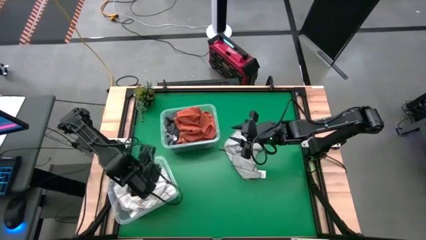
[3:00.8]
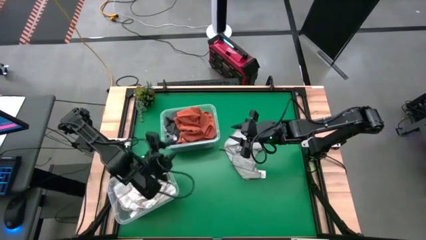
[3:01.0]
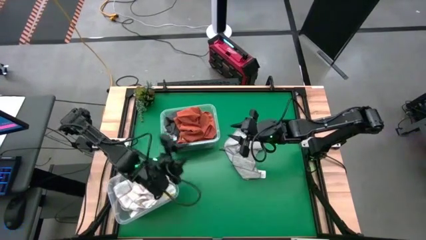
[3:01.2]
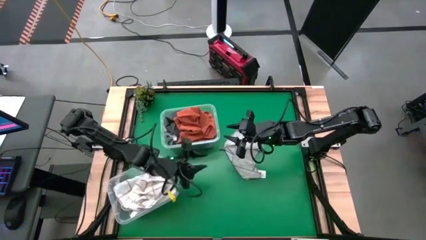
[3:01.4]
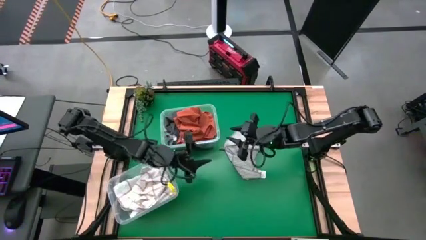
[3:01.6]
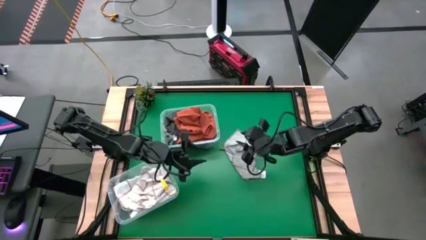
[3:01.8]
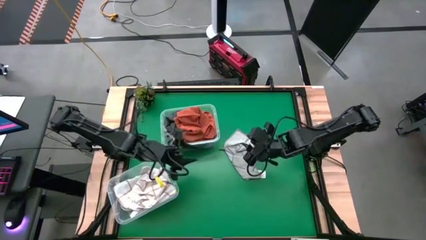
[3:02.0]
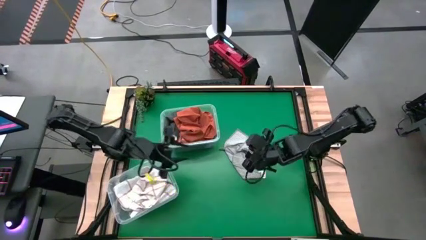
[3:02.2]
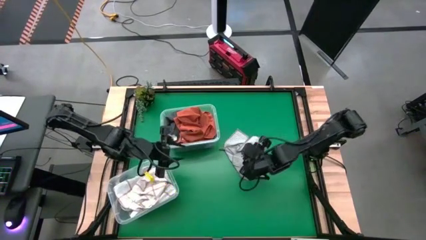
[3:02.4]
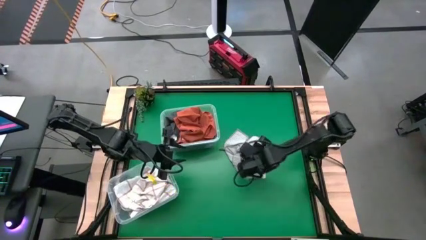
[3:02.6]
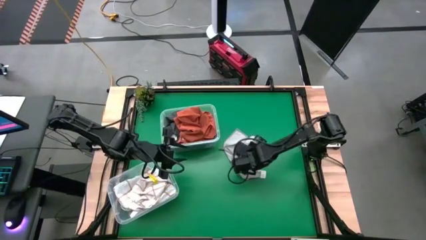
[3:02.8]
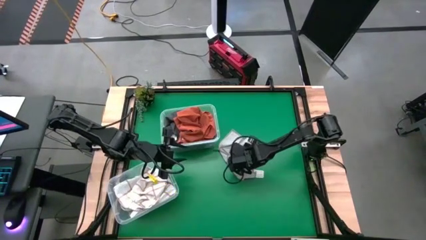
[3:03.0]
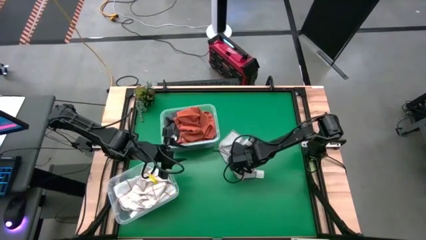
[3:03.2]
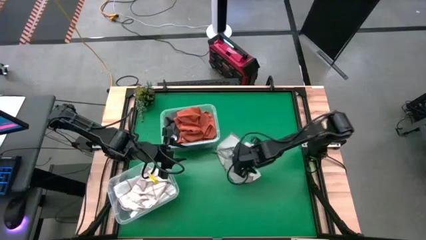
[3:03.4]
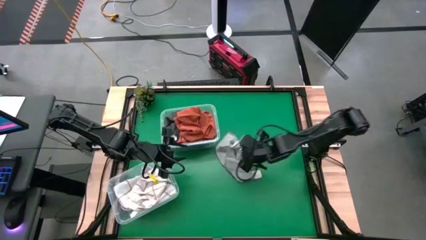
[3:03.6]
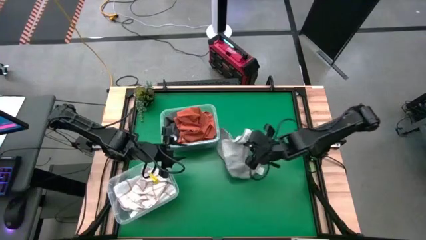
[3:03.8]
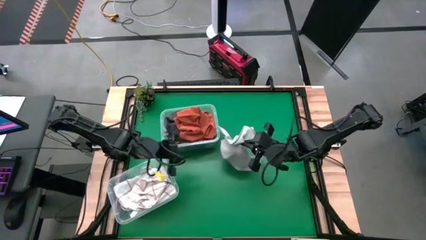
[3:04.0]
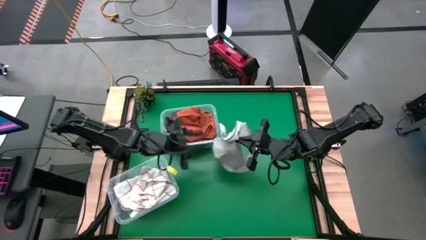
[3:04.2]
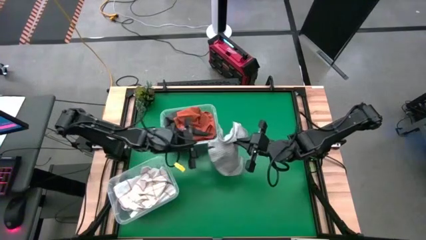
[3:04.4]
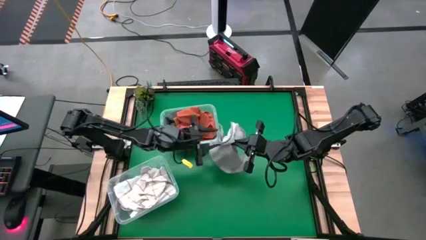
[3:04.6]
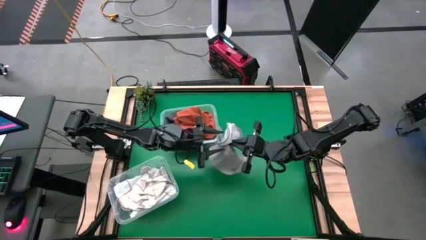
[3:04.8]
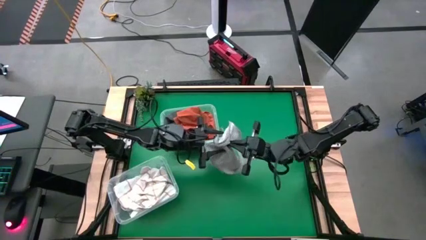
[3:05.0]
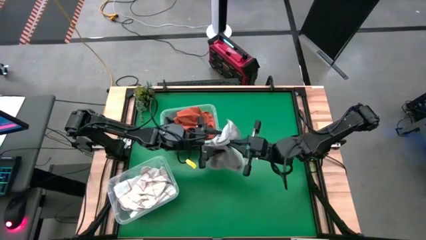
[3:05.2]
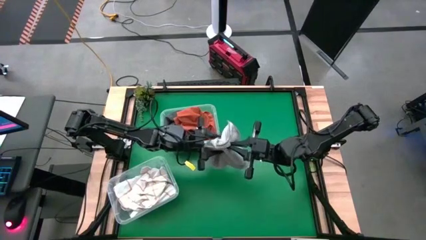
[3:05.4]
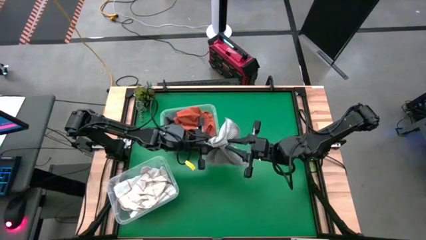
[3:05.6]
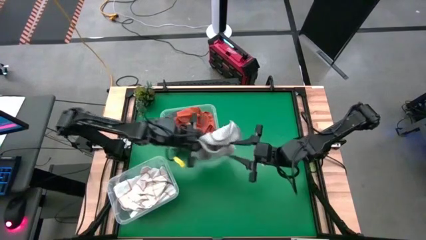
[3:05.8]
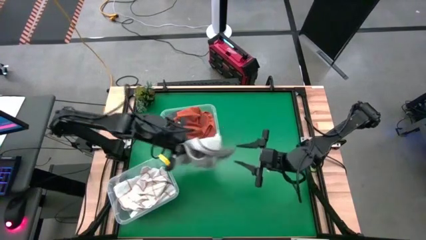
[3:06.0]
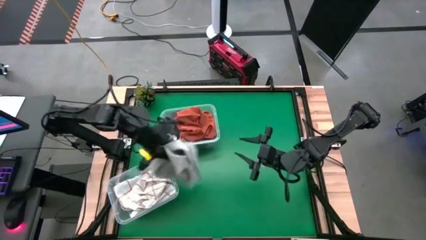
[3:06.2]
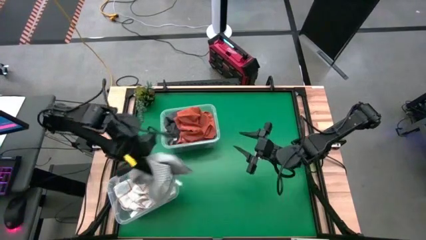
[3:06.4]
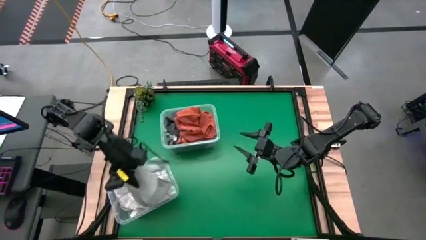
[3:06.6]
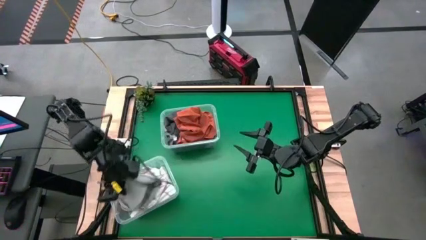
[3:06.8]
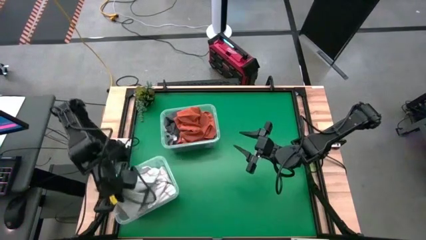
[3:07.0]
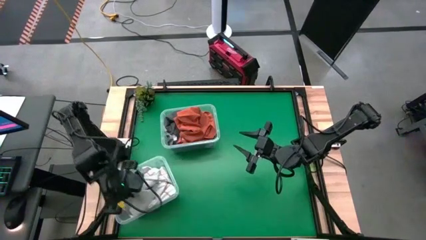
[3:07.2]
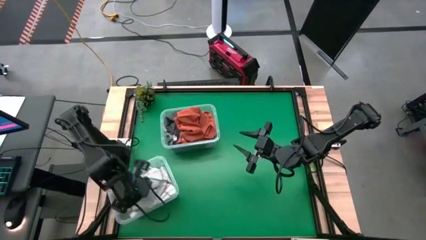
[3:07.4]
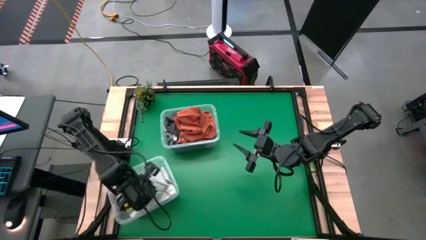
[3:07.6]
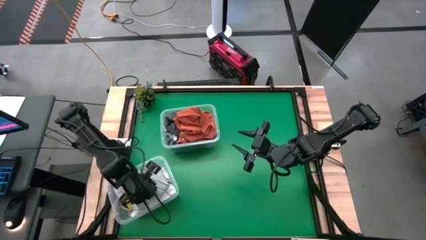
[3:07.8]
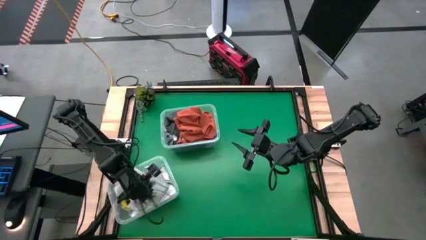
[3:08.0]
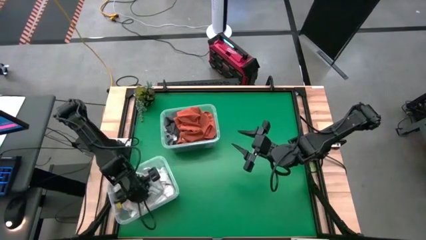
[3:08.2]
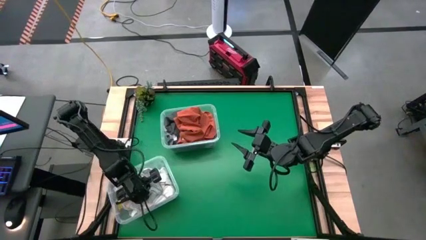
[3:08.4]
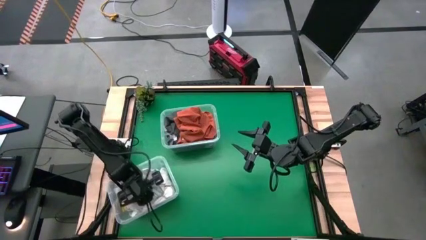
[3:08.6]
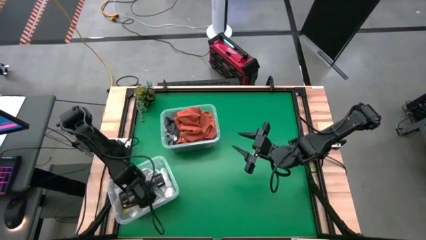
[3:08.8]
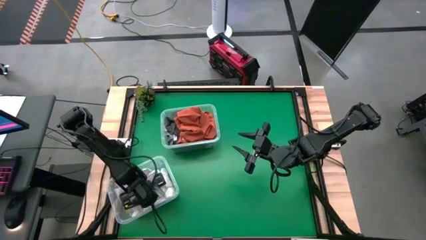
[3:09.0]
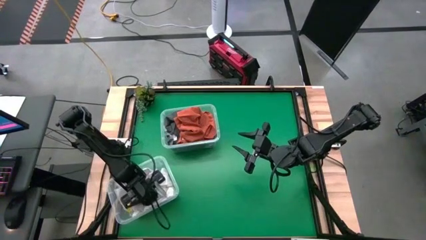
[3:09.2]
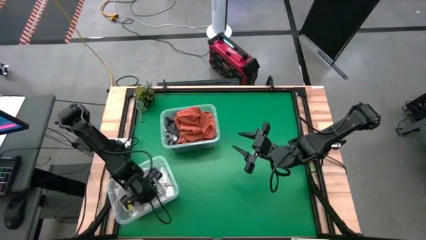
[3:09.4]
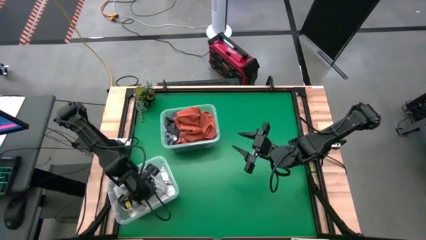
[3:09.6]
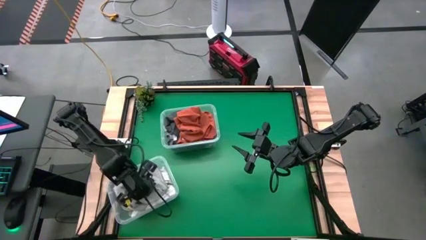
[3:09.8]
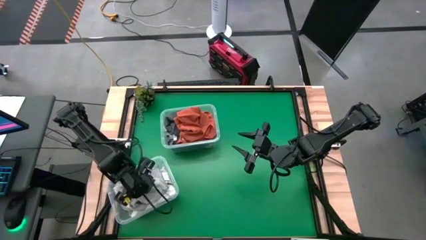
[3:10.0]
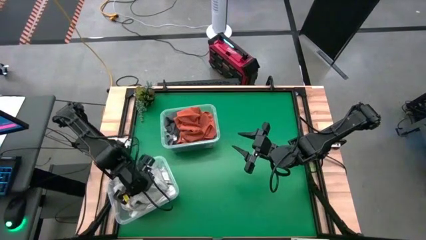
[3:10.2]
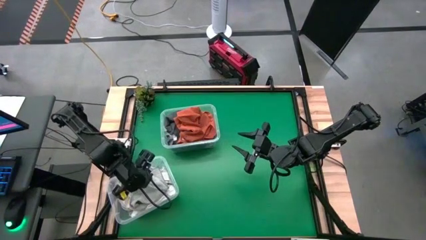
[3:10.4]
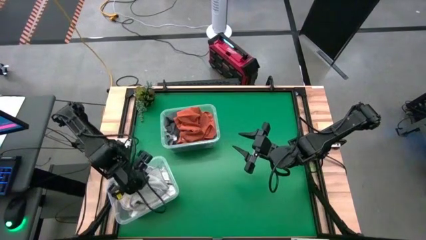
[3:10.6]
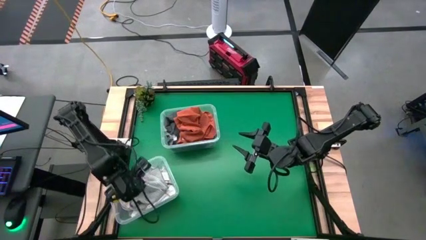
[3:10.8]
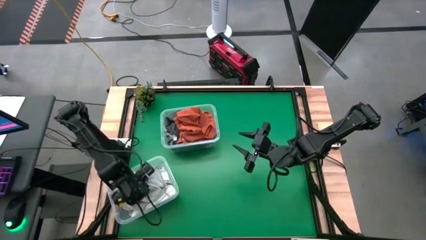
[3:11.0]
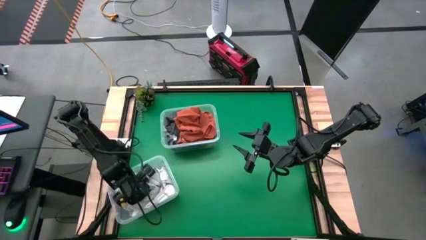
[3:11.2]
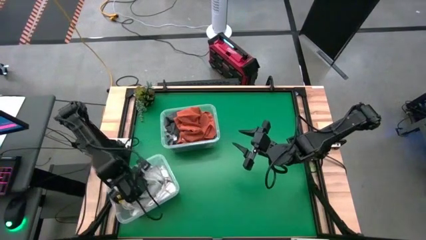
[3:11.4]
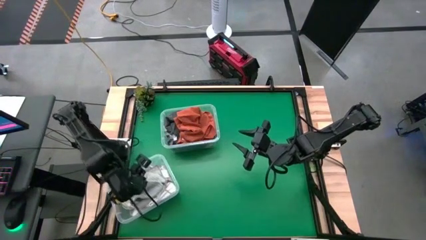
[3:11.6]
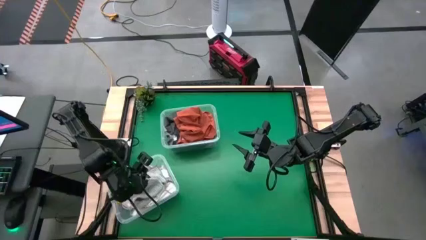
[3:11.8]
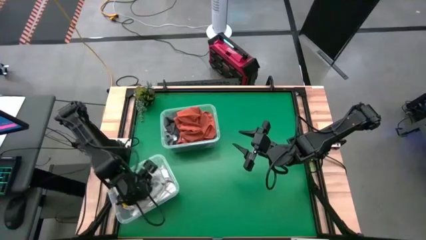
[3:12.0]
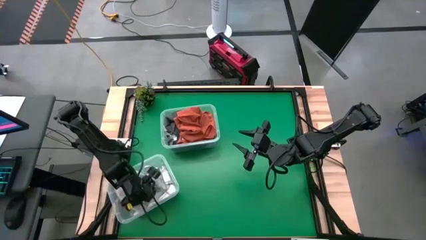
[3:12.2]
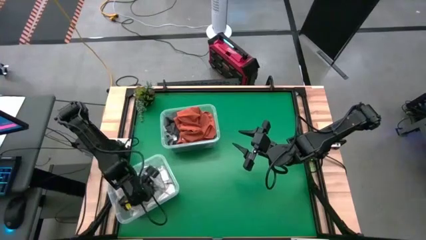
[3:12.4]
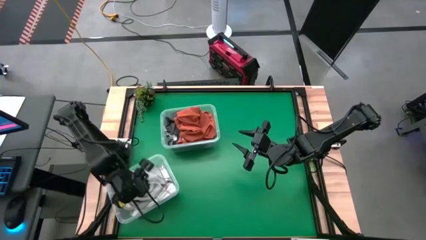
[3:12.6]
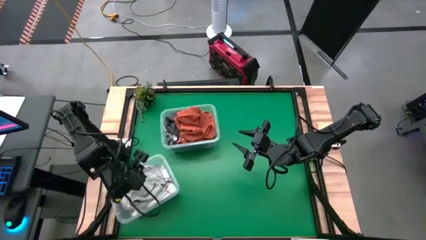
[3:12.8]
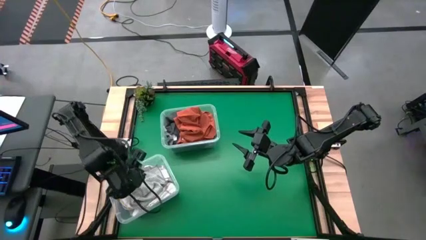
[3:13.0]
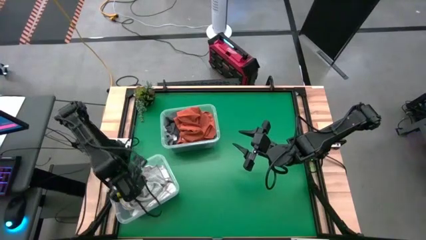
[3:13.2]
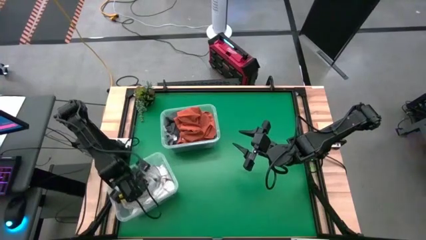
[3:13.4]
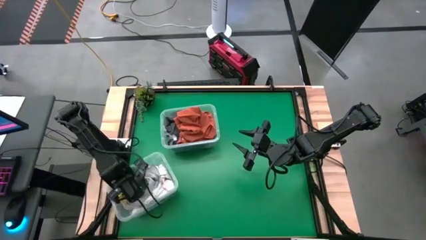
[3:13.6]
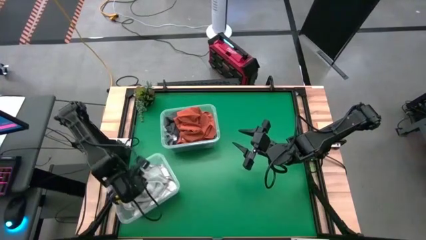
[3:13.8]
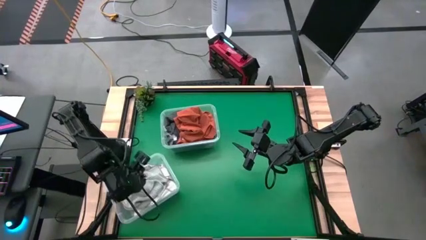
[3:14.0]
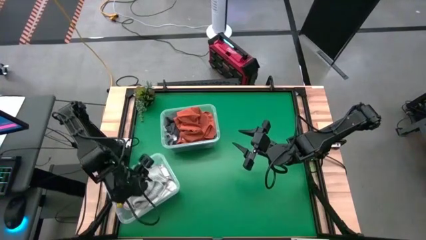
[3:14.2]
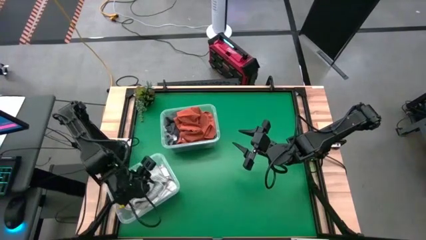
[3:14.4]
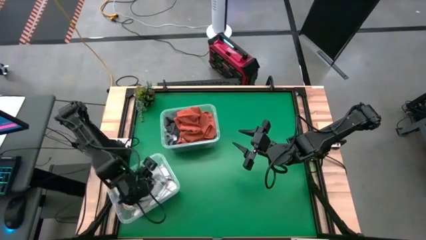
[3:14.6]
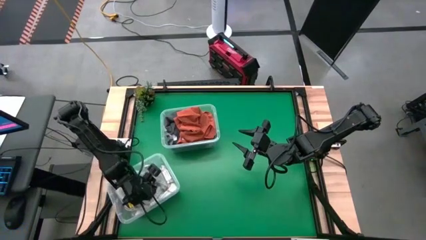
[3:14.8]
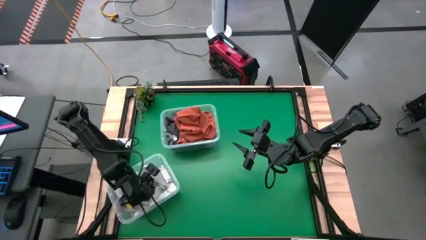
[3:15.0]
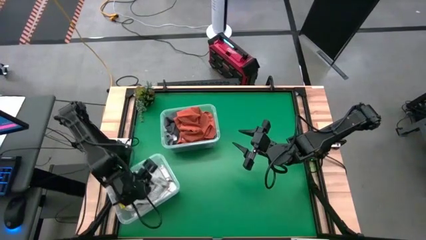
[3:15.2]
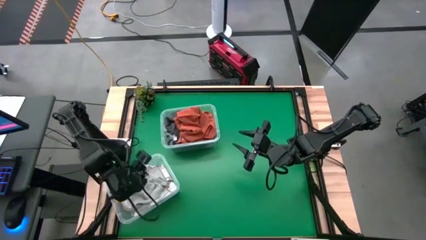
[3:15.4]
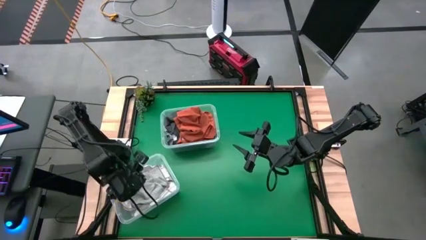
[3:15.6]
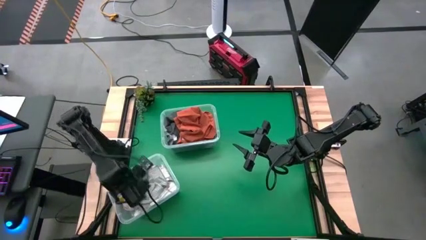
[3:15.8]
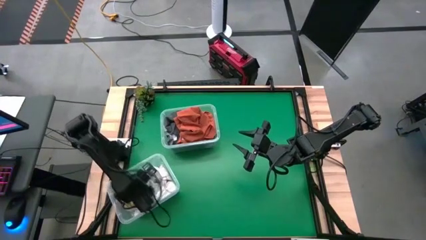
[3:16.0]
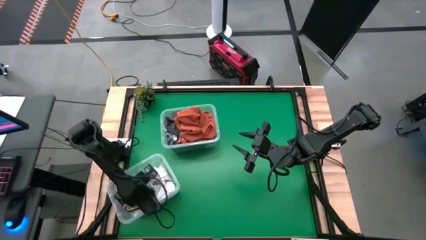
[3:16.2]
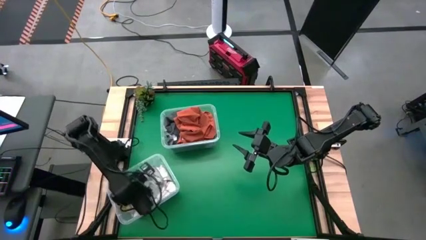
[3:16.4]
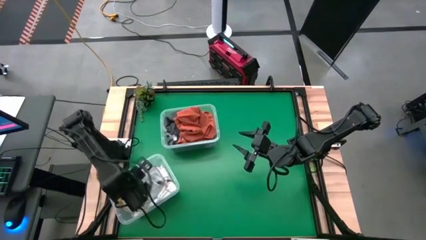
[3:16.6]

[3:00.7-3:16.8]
Task: Sort towels by color in basket
Put the light gray towel into the bottom transparent bin

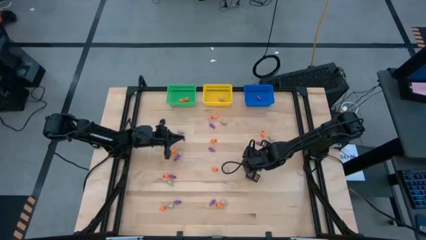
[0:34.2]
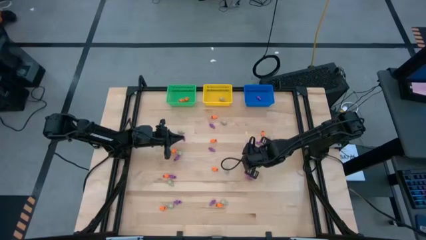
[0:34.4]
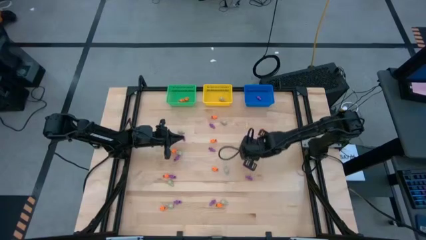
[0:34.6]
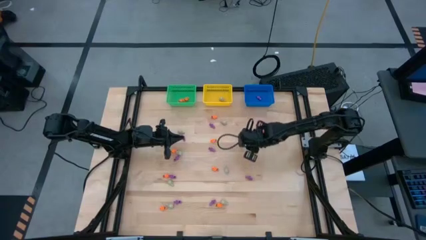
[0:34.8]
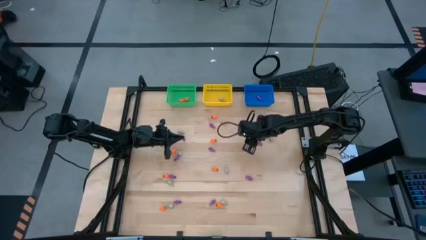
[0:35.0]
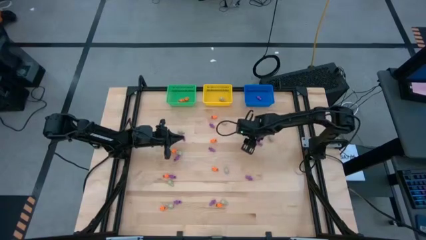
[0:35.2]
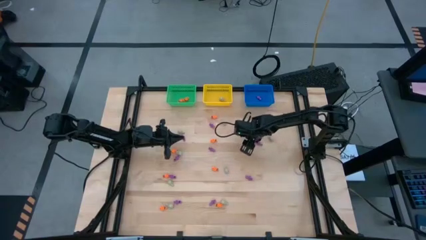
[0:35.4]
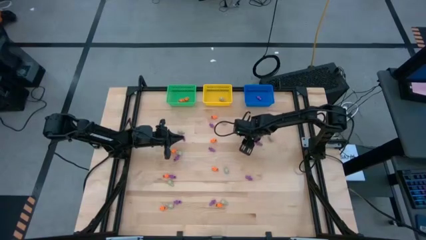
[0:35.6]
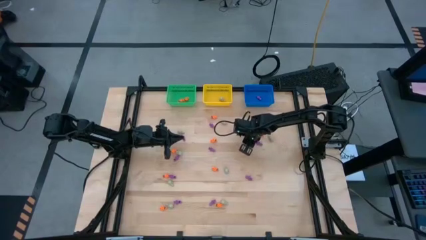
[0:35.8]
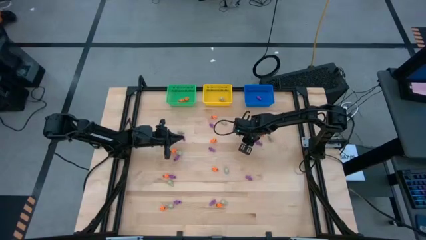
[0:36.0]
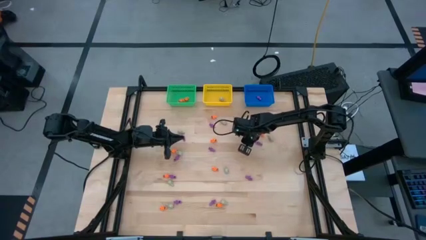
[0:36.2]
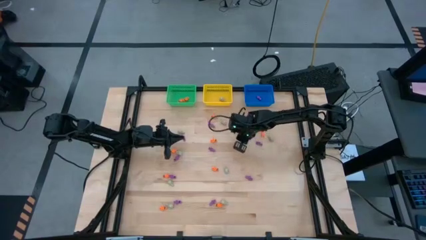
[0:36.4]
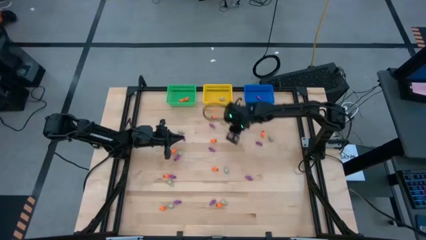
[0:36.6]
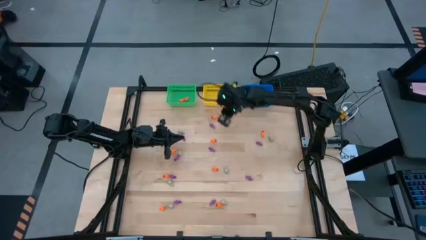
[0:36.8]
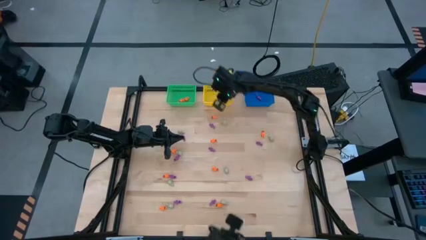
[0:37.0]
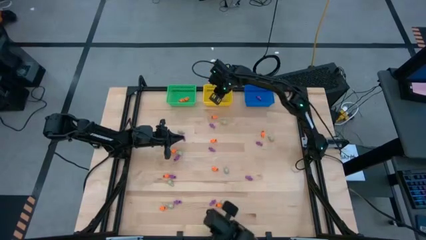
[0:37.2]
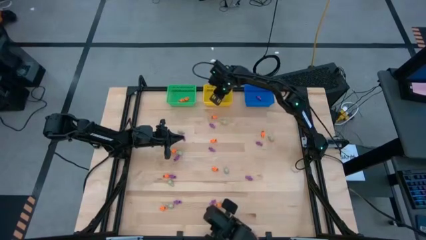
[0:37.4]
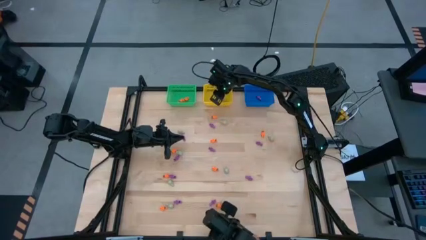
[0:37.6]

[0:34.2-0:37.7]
Task: Sort Halloween decoration
Put the white skull toy into the yellow bin
